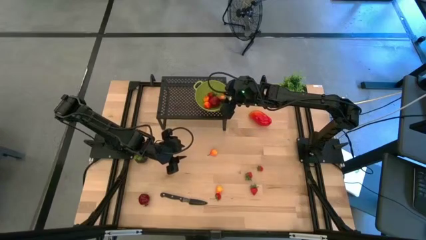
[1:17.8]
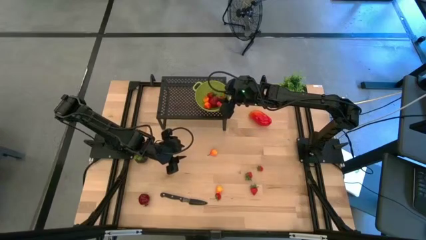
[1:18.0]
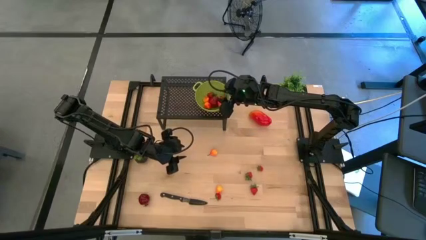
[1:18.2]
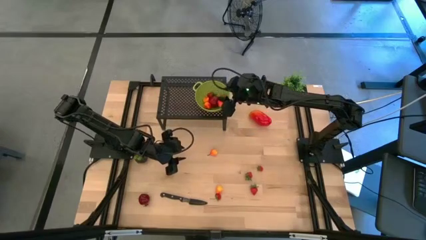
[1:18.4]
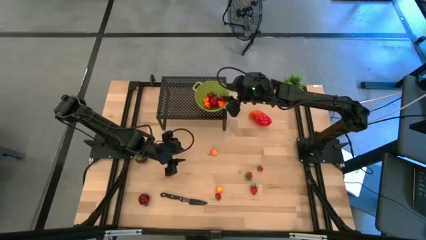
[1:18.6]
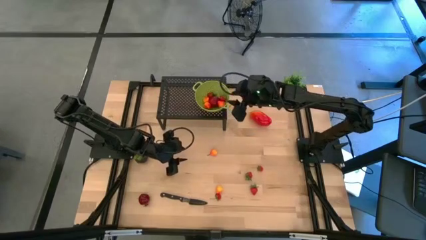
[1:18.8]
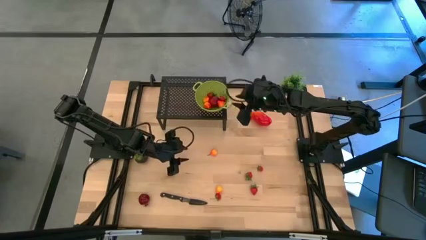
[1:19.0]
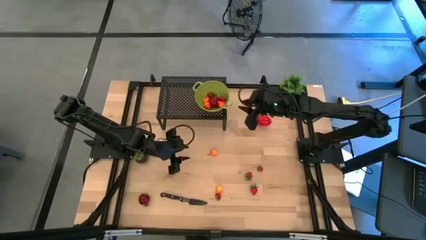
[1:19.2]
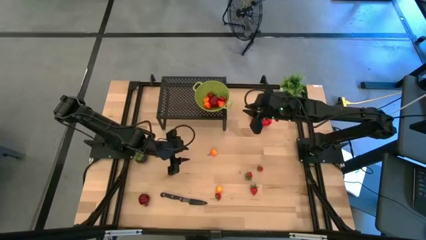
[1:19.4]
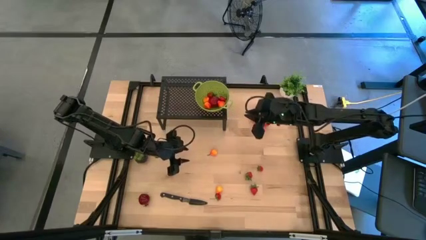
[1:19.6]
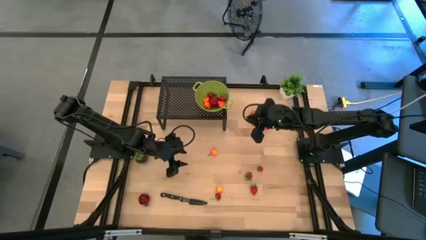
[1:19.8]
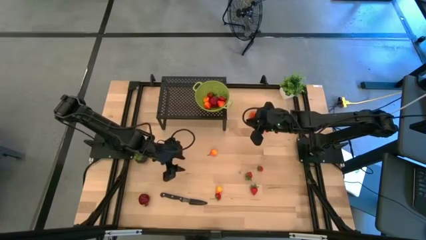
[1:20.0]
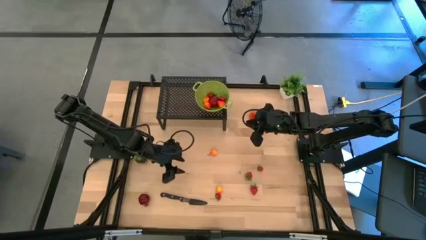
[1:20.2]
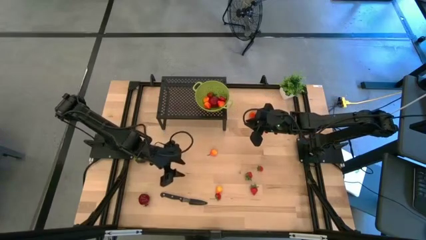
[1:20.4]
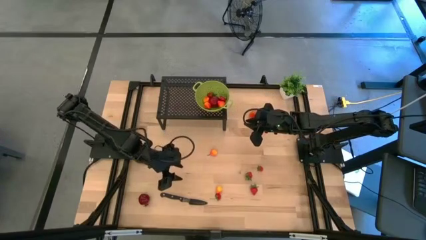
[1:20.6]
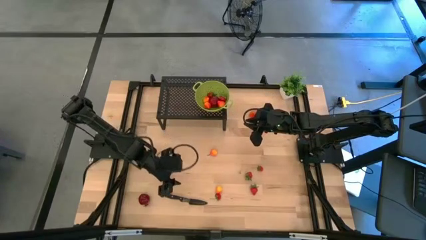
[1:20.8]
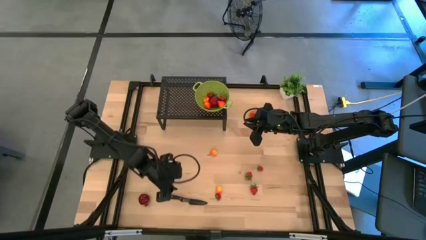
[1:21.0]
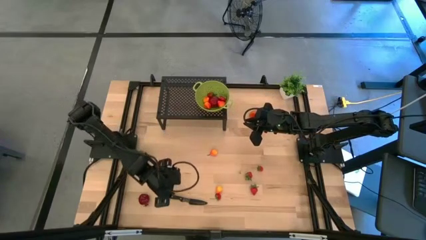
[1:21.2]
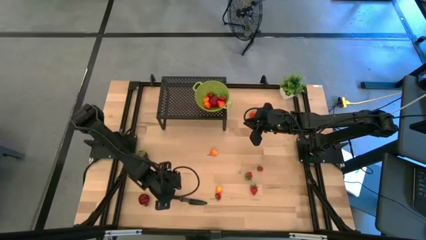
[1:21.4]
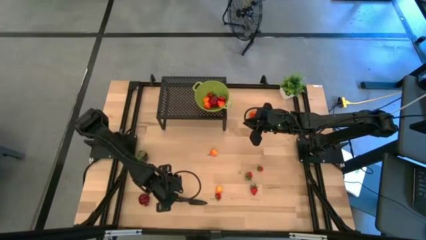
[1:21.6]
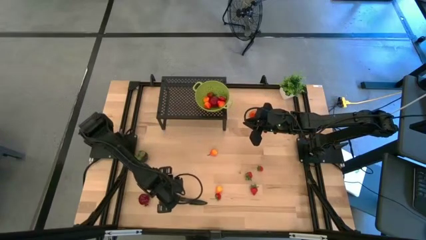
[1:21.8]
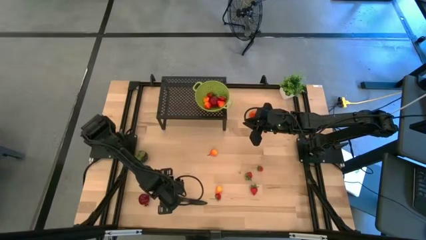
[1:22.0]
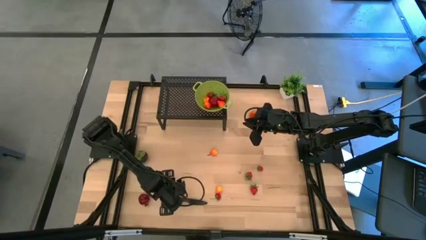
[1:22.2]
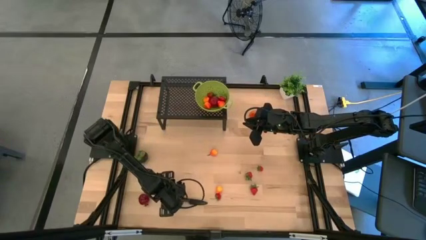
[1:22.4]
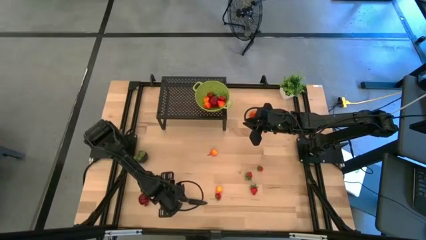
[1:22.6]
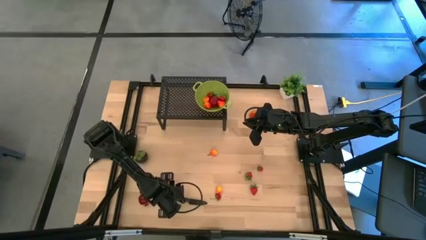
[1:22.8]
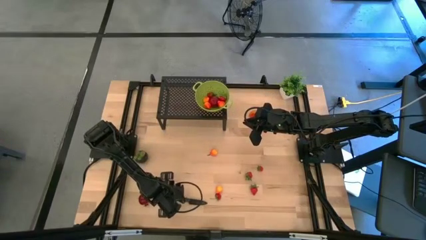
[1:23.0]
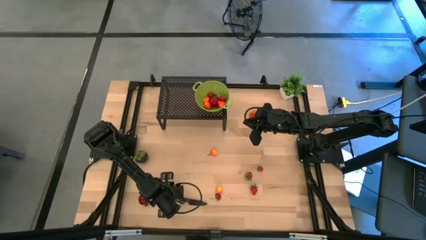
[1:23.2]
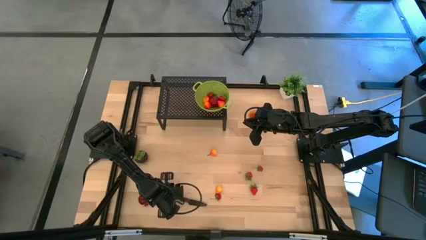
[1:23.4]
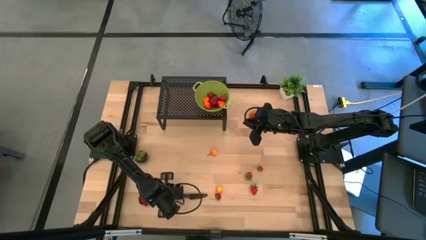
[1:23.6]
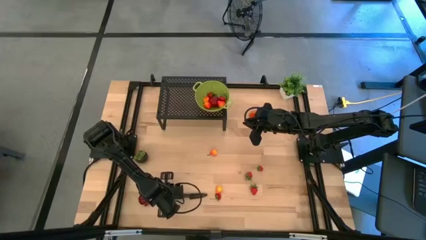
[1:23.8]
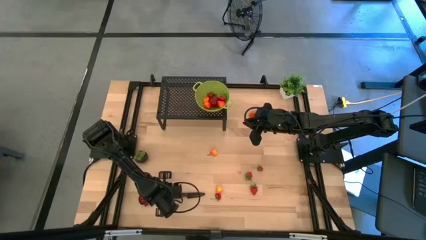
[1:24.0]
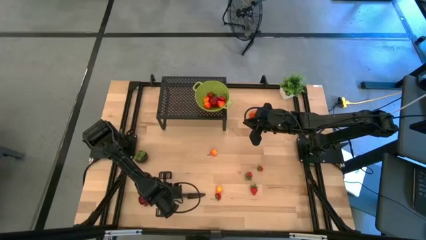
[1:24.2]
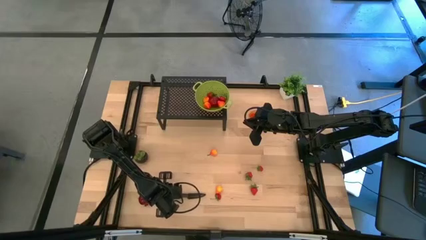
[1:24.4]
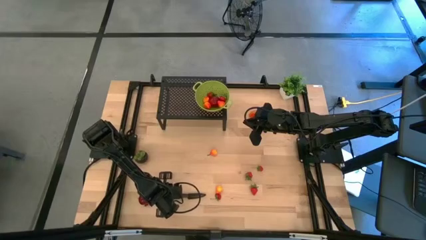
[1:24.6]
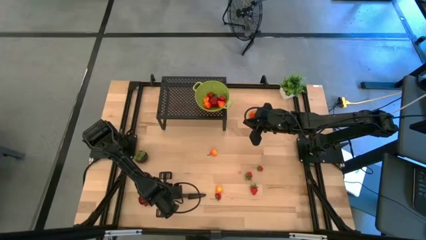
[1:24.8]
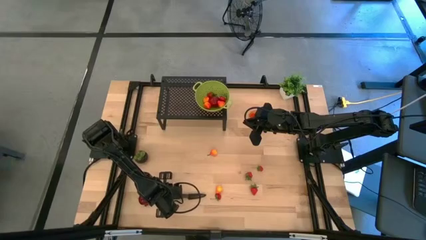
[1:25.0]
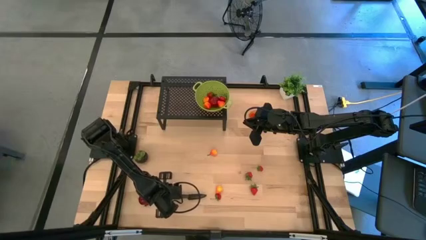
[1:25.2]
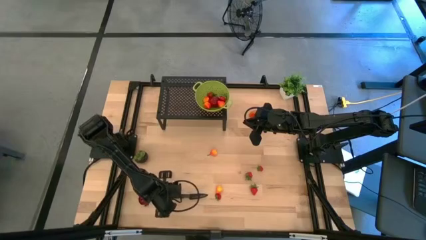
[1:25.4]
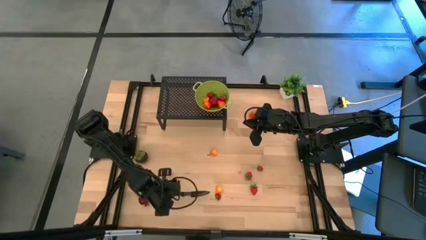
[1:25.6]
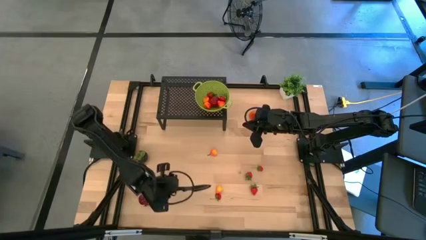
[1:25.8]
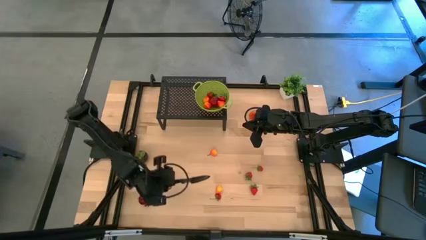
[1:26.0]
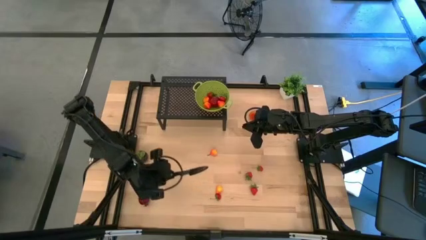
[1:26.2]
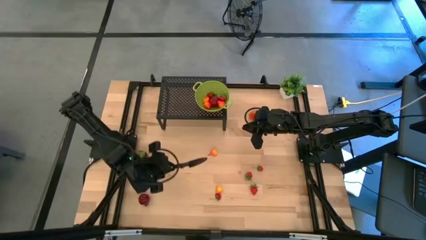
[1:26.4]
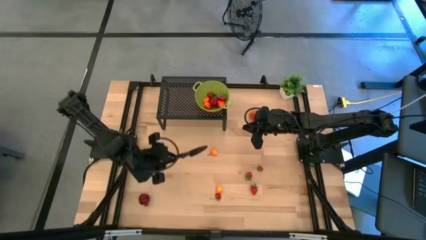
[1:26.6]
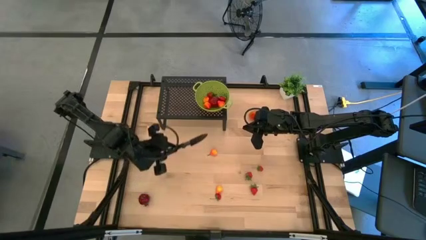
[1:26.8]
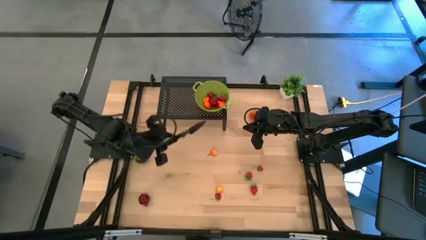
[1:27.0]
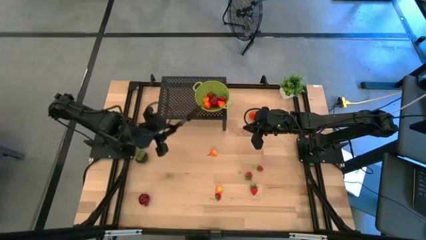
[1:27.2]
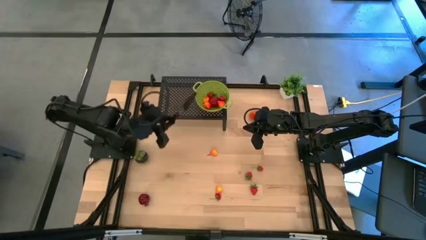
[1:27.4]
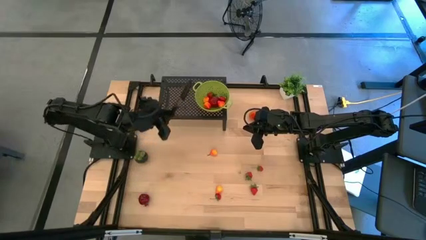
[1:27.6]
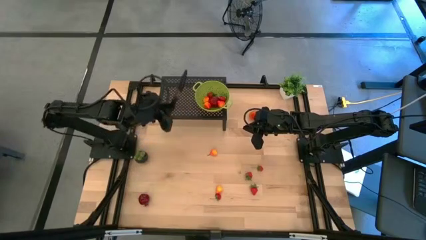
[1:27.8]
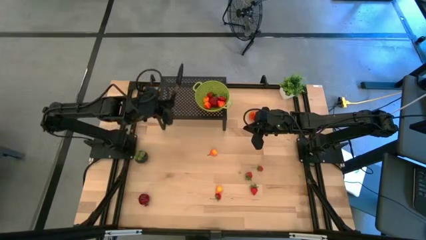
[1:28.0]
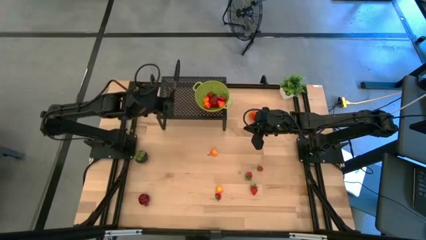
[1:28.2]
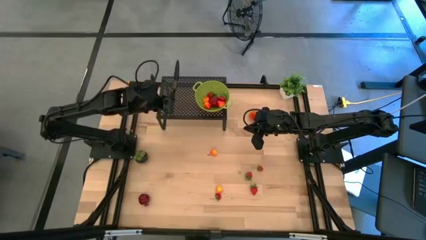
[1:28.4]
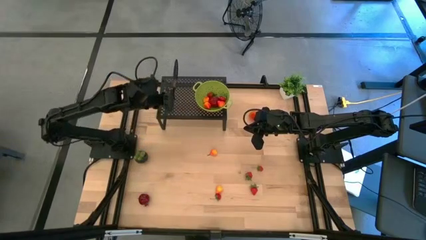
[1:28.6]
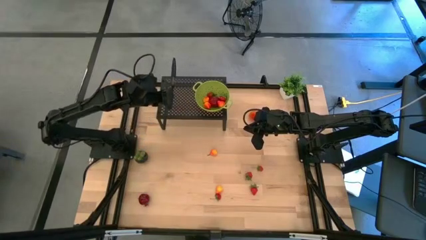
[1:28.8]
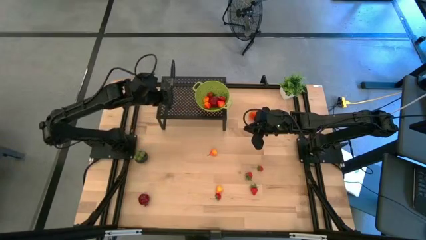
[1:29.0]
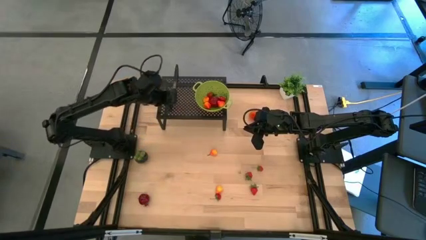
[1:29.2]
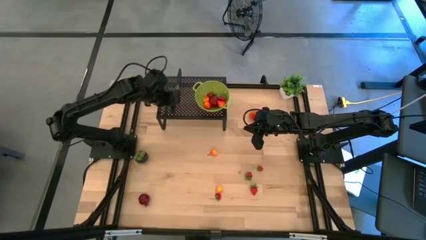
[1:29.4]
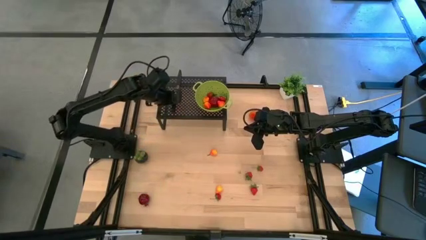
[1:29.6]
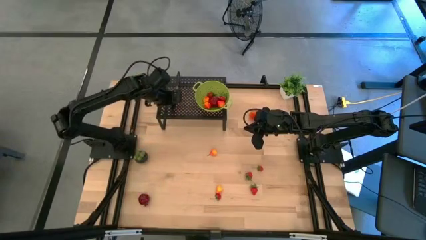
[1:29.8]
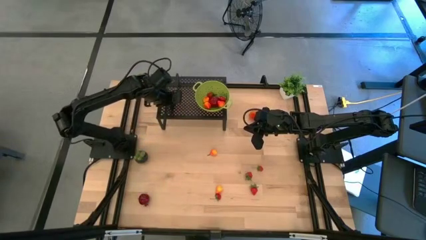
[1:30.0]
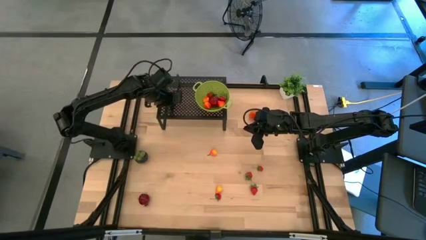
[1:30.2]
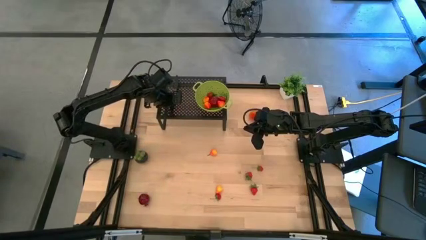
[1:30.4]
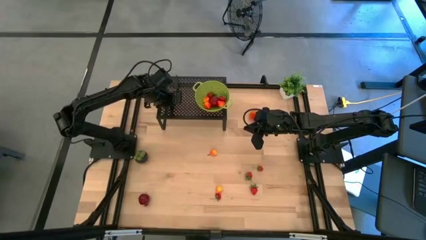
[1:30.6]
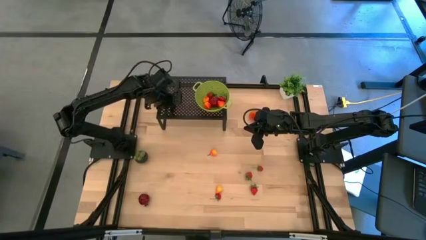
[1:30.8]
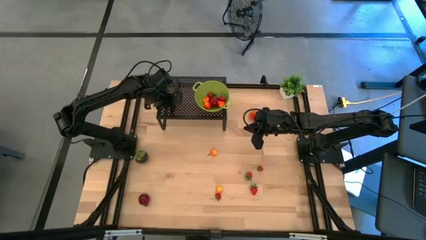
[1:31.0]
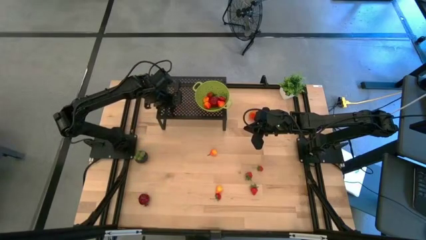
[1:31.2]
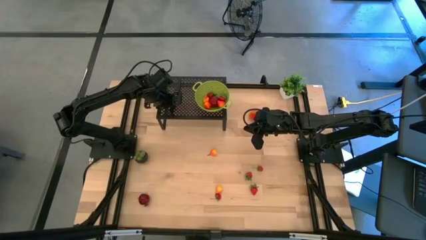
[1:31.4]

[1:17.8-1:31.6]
Task: Pick & Place Fruit
Put the black kitchen knife on the shelf

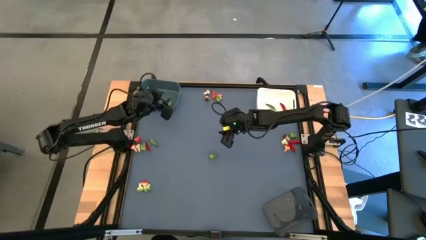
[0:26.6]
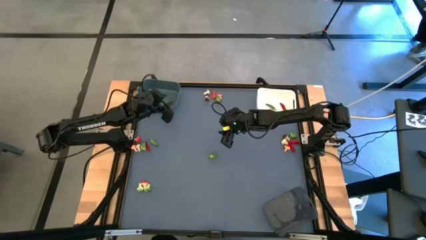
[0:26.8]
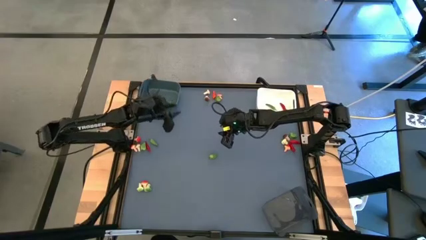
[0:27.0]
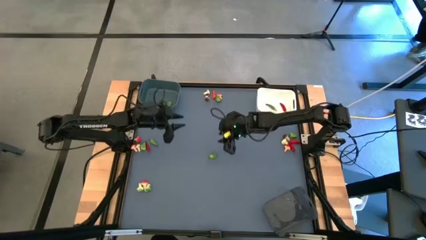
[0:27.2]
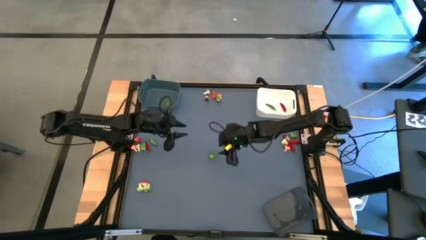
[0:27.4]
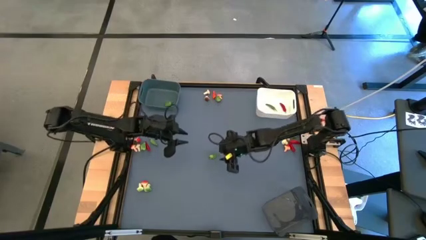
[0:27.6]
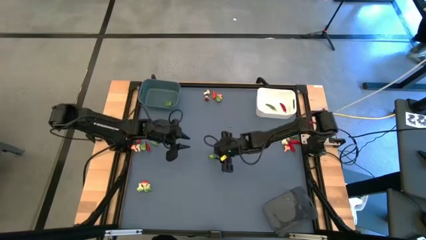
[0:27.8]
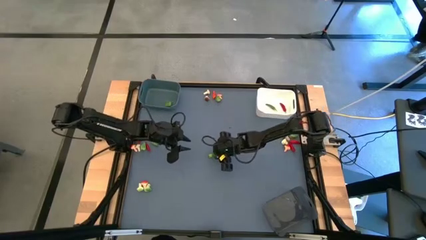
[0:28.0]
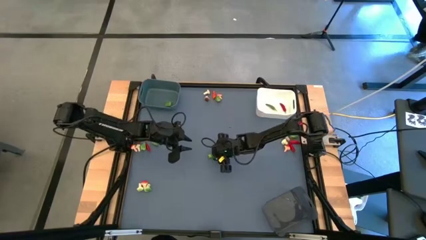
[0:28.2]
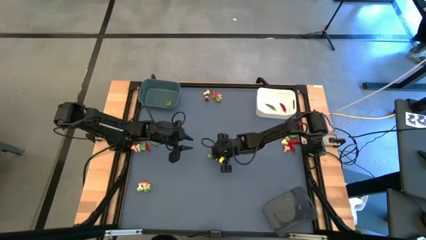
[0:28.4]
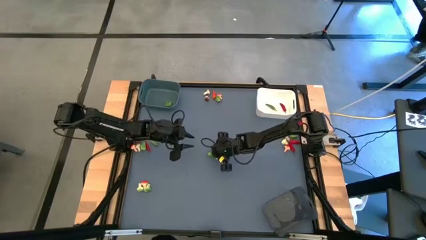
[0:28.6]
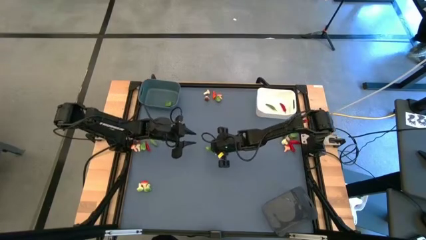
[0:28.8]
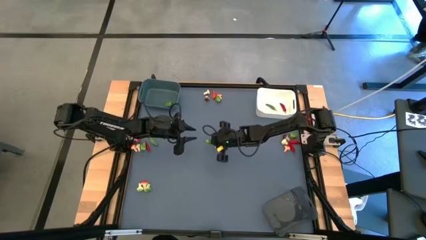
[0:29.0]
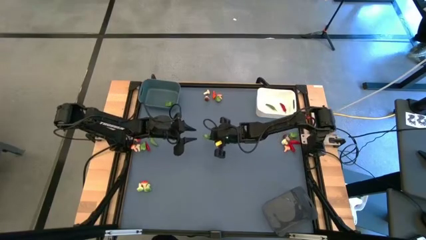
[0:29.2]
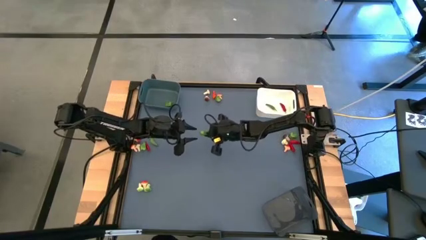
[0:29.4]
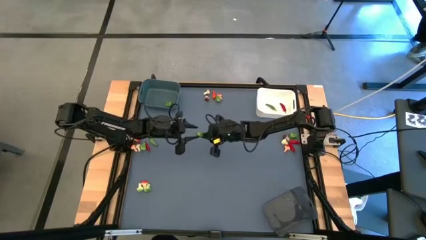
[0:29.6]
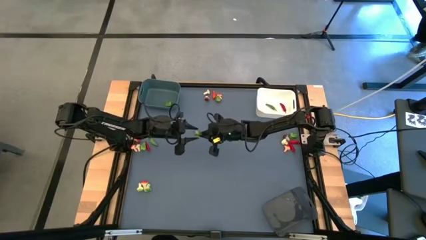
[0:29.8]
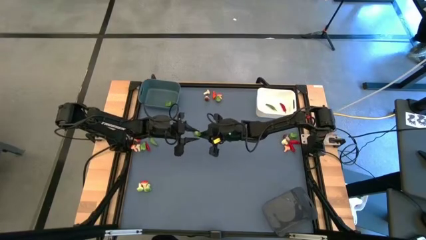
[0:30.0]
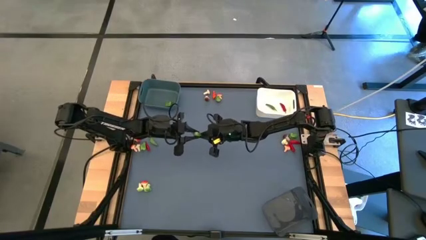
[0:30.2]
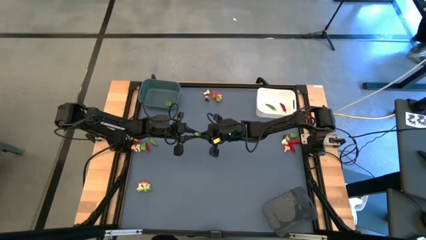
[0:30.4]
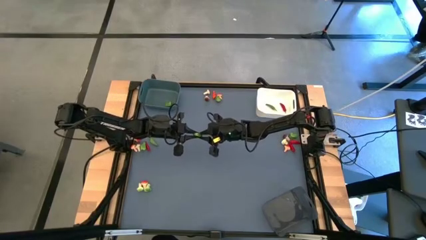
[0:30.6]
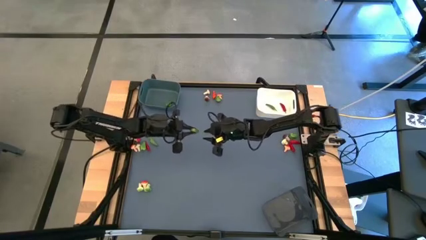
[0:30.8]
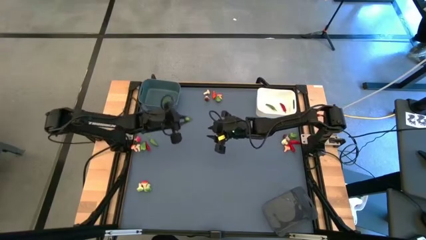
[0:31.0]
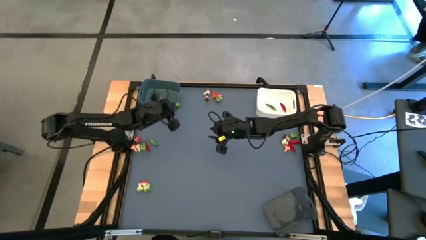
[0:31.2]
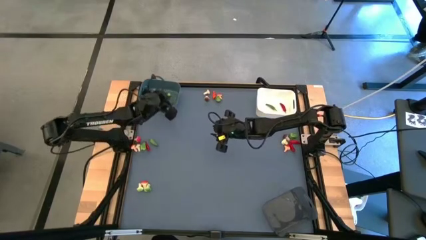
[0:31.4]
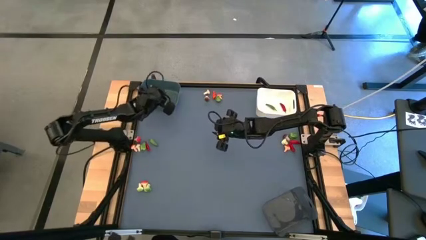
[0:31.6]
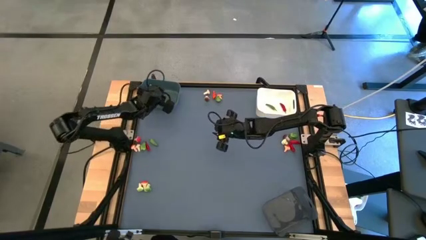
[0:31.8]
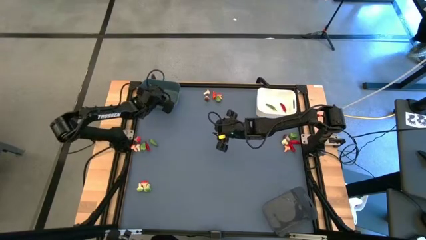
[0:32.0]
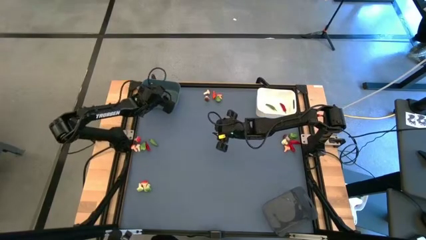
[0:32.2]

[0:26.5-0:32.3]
Task: Sort produce into baskets
Put the green bell pepper into the blue bin
